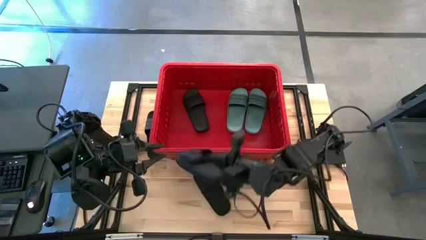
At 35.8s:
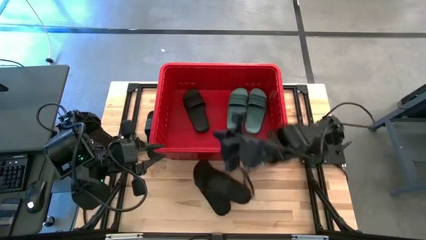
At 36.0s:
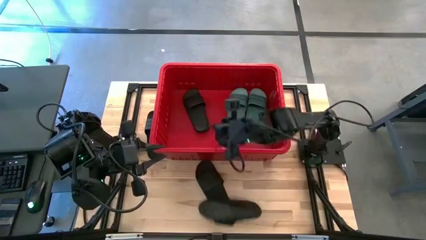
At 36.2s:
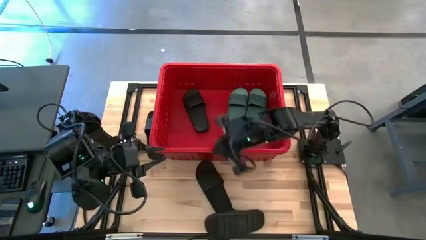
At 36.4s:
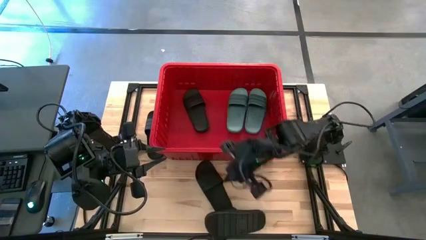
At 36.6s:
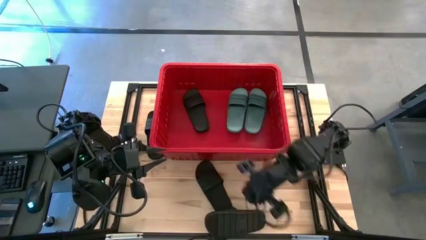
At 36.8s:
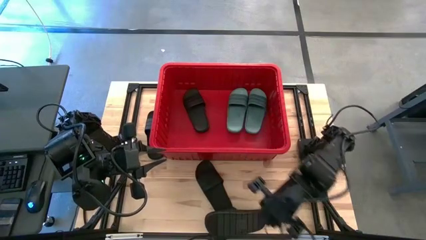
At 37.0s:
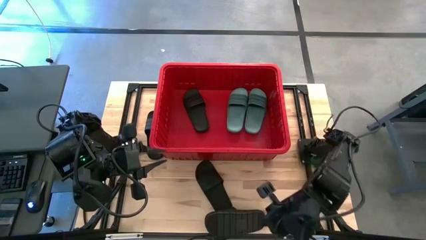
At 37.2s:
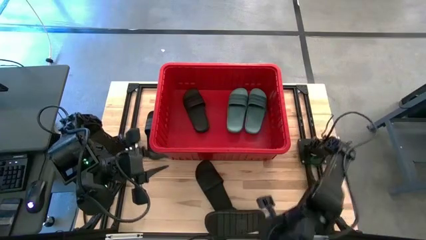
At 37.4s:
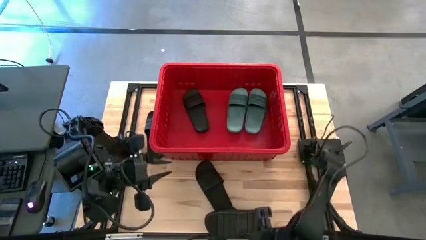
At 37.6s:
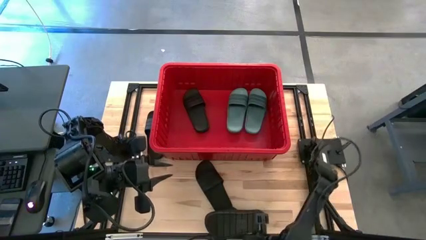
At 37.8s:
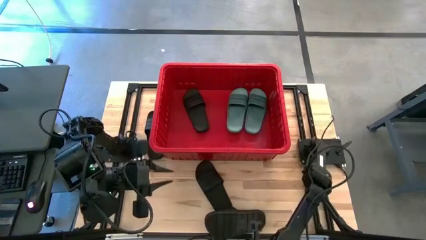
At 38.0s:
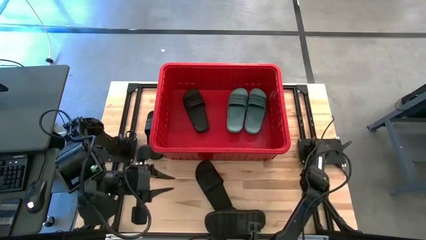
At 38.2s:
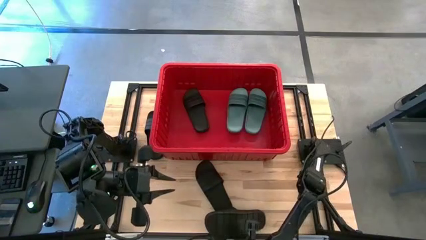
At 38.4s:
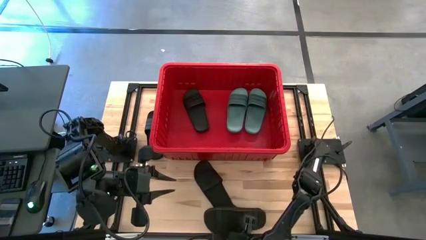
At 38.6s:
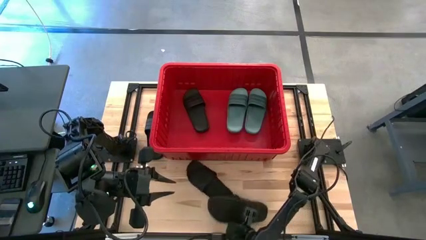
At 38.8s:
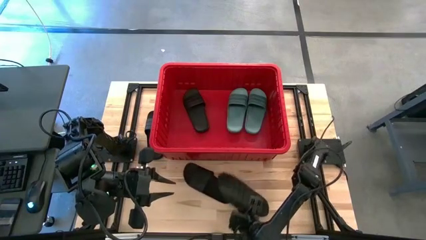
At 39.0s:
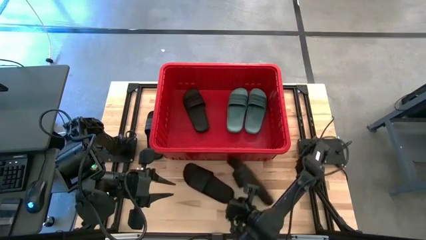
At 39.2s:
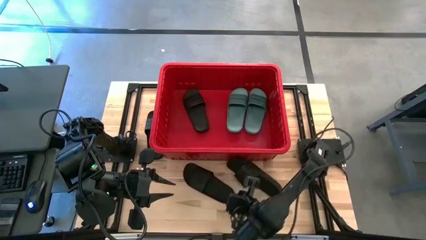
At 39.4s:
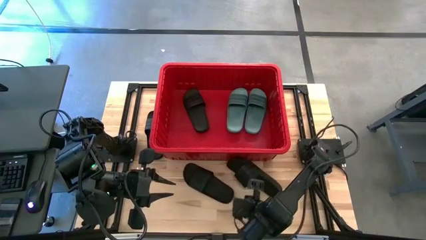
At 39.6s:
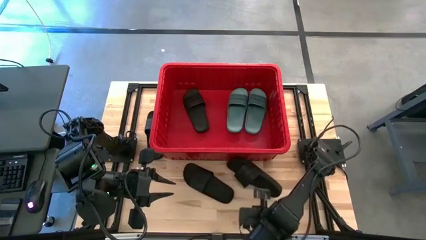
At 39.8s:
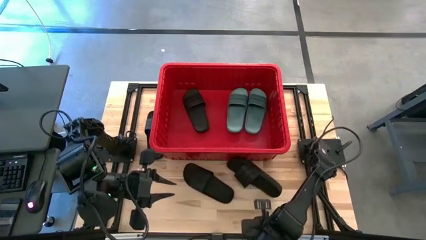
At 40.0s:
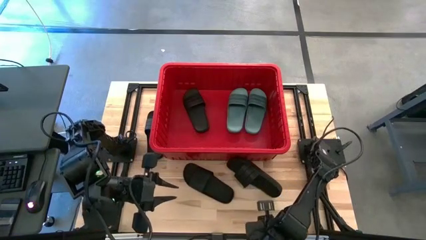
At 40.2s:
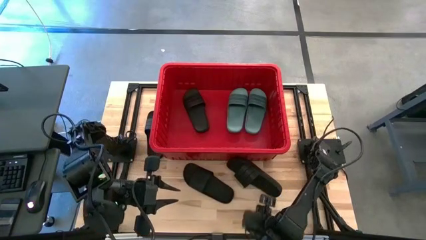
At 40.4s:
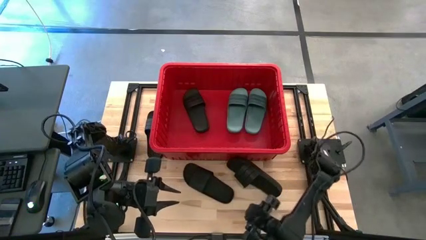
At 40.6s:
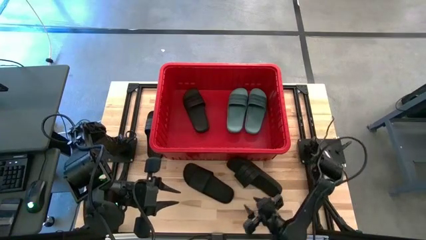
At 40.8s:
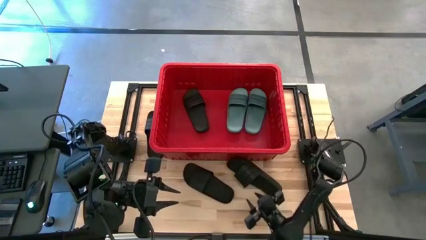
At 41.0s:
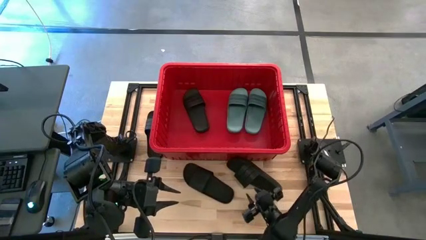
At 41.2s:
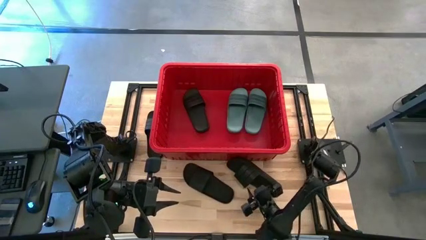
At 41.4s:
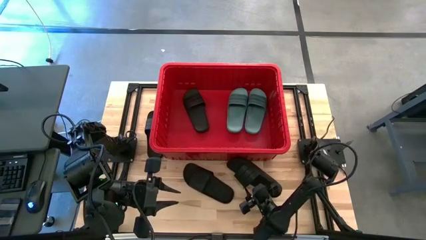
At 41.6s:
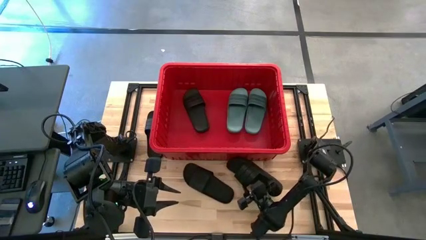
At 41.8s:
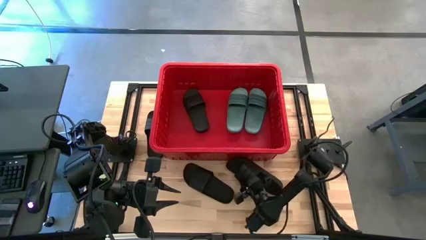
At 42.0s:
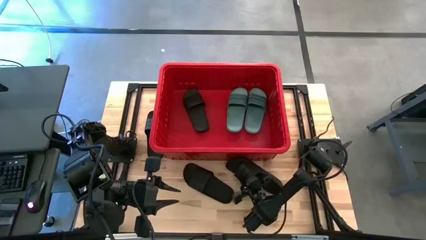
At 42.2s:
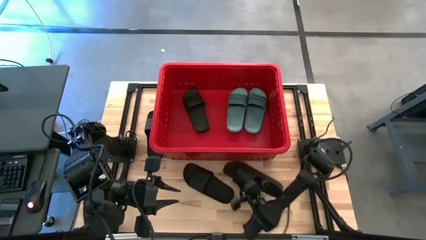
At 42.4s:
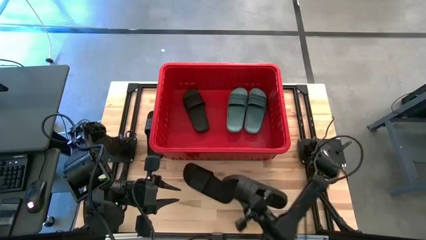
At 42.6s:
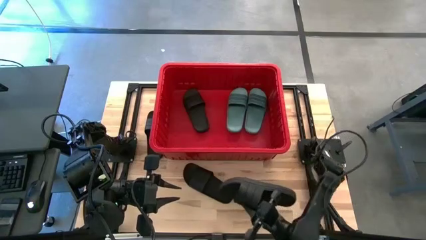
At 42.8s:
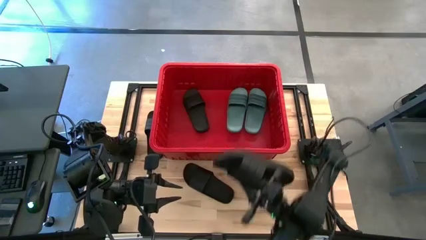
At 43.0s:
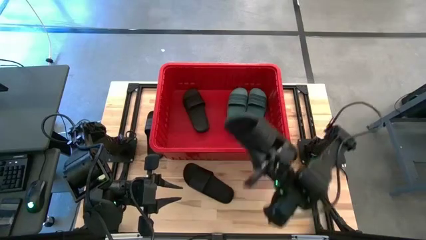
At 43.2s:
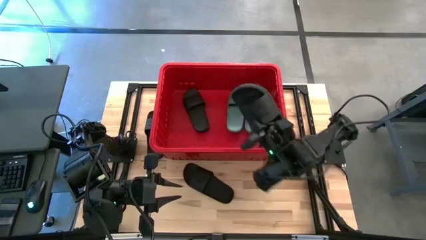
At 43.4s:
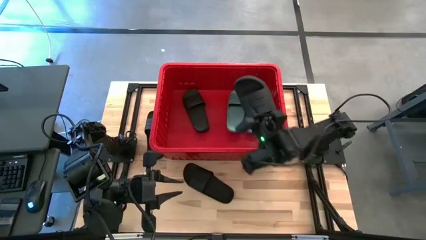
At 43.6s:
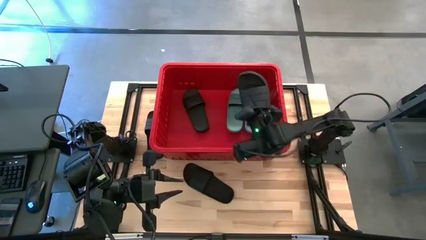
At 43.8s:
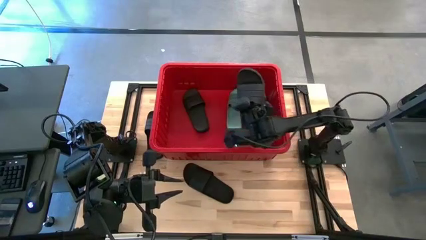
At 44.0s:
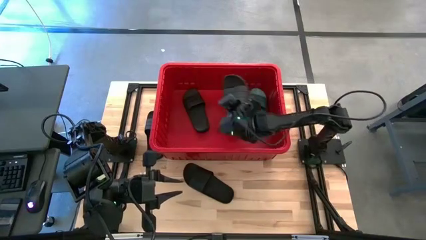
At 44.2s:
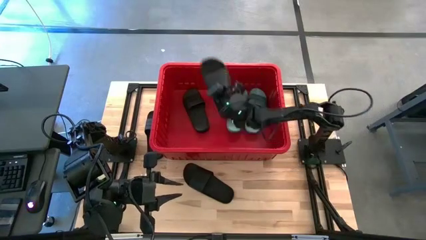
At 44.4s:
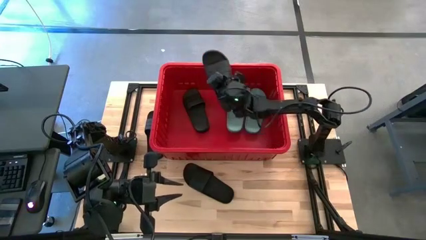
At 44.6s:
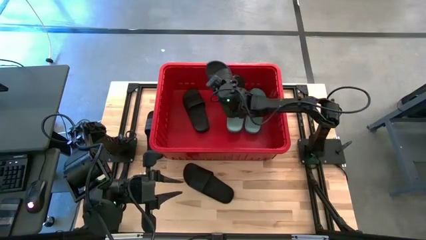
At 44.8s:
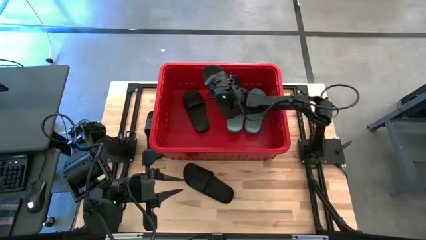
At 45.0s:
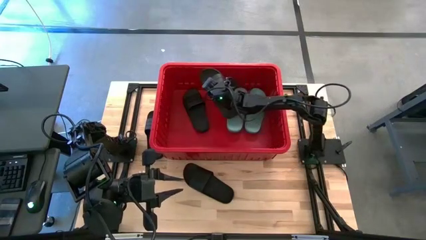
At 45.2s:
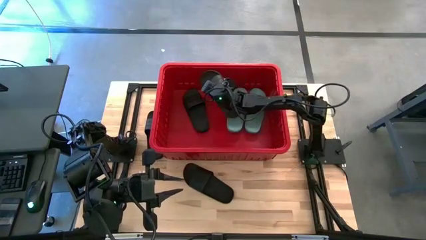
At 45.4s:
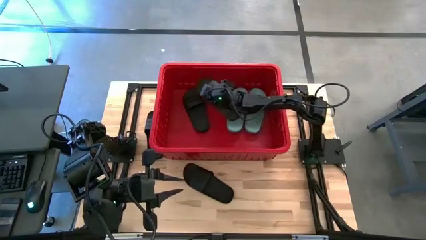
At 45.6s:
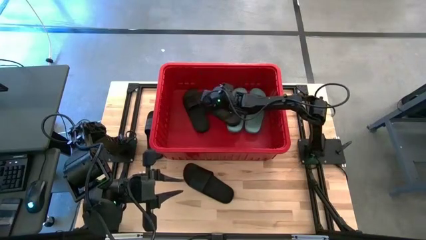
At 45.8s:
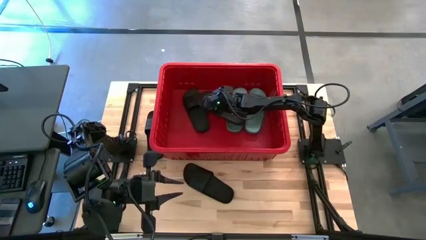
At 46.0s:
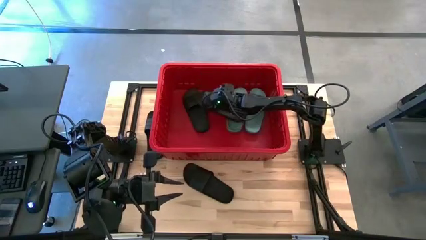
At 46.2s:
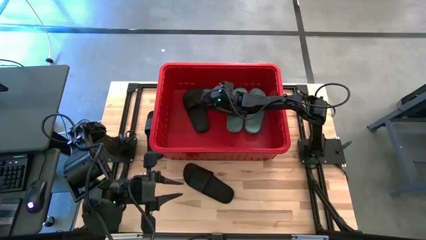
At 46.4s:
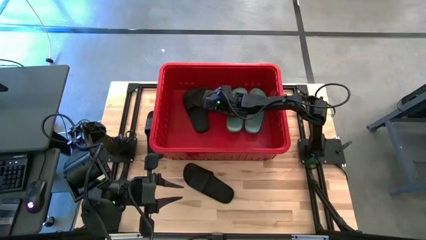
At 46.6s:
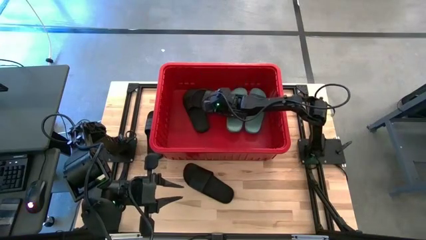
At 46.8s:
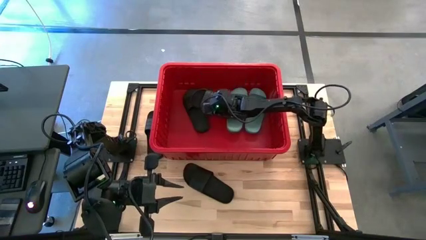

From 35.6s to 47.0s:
Task: Pick and place slides into bin
Put the bottom black slipper into the red bin

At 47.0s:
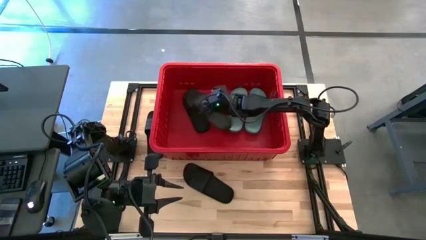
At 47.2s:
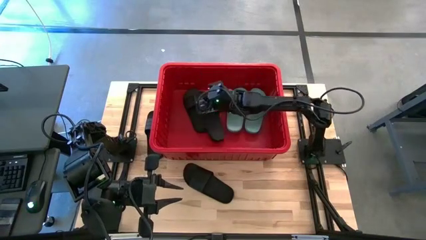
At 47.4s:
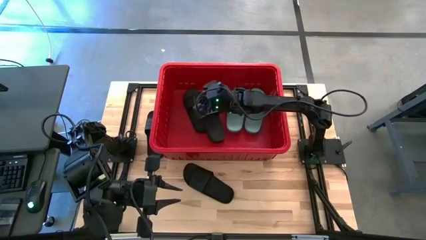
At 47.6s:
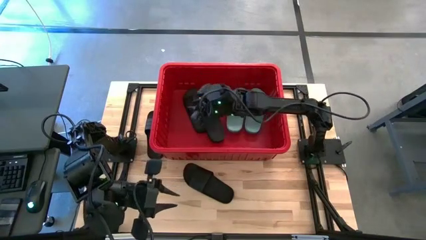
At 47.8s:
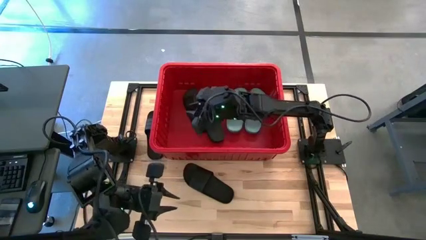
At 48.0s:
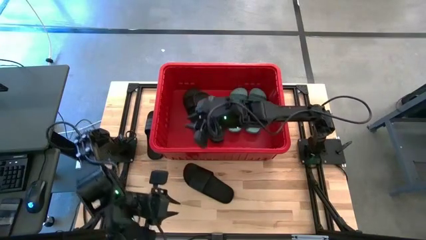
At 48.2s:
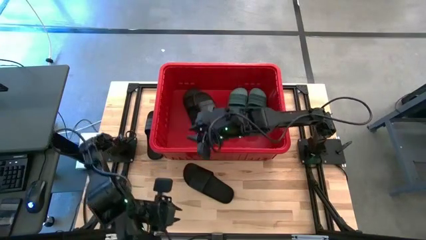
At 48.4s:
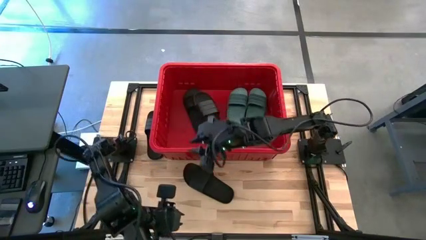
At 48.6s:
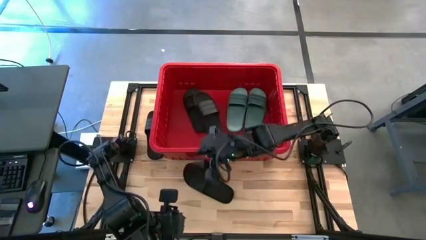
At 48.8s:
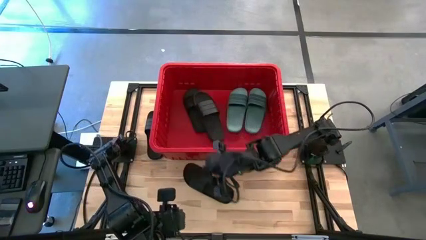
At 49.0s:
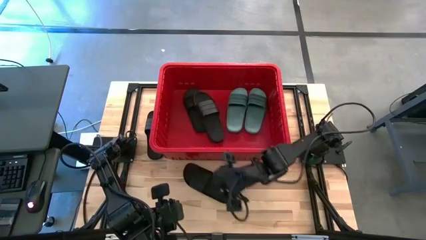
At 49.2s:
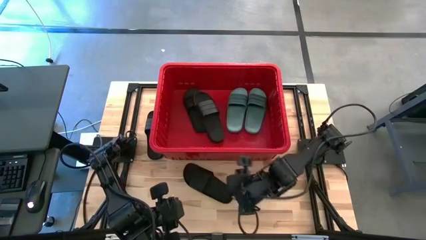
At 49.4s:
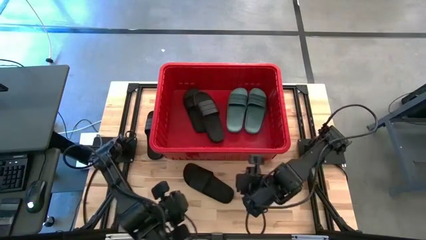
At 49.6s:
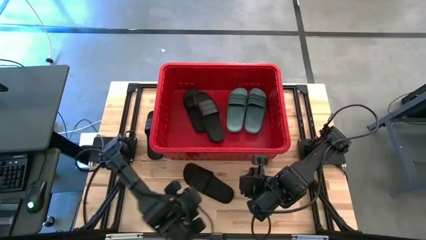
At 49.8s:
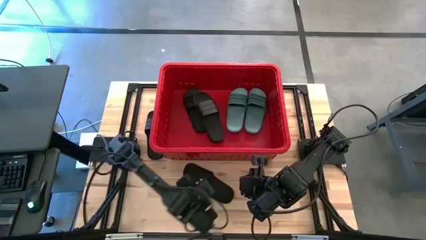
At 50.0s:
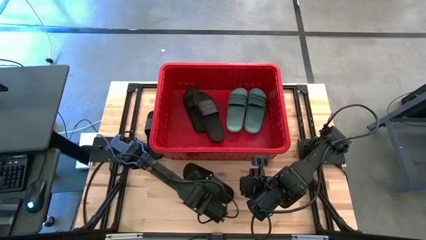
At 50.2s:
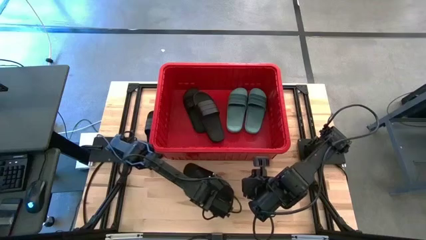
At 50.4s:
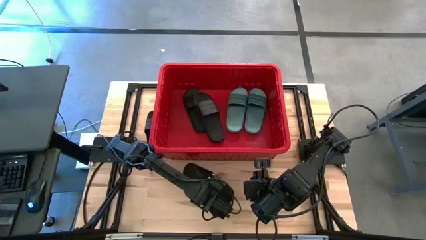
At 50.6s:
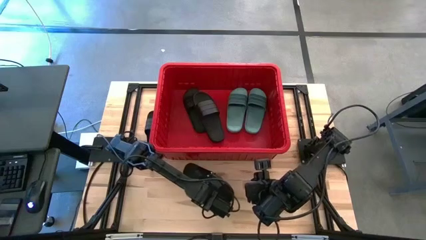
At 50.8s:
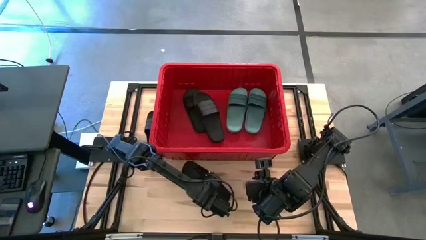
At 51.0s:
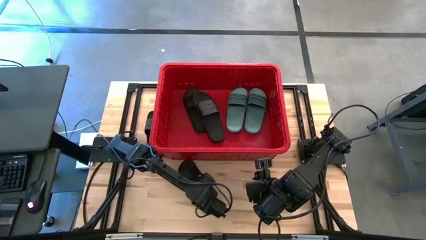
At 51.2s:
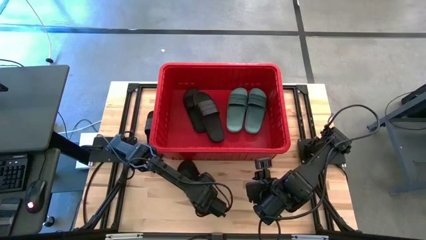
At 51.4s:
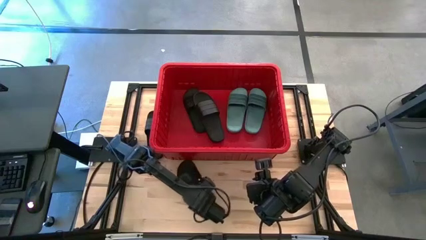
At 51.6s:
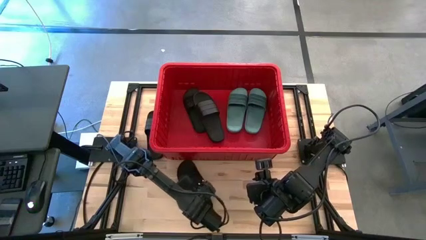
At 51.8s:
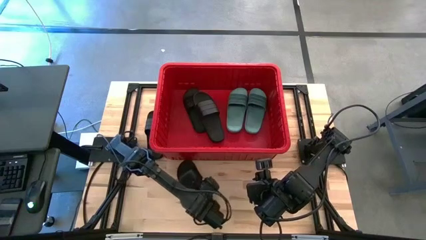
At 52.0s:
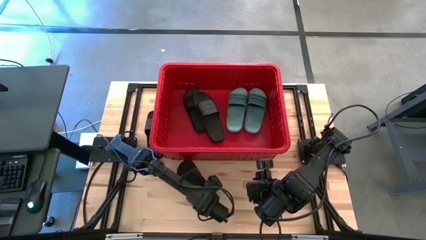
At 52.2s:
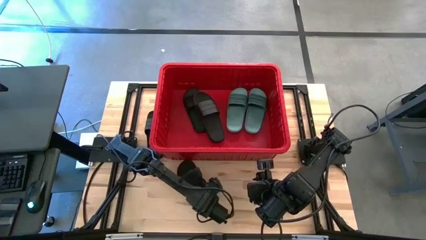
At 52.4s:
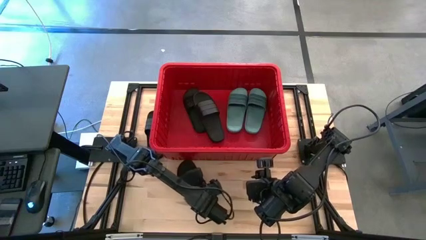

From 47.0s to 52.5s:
Put the bottom black slipper into the red bin
